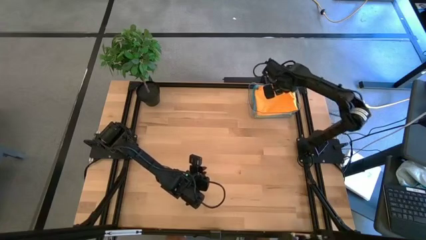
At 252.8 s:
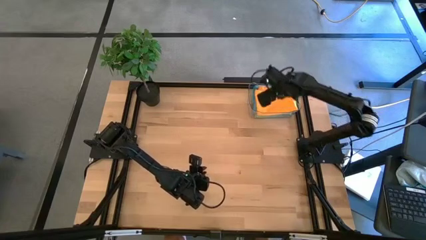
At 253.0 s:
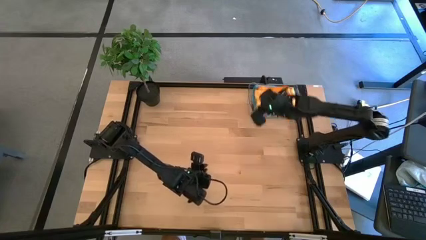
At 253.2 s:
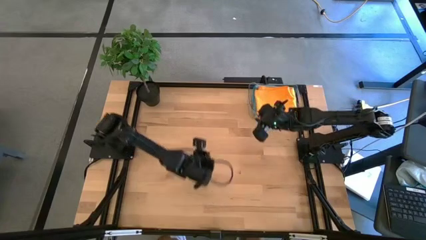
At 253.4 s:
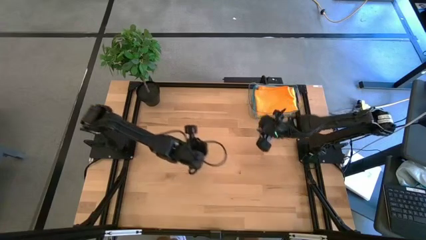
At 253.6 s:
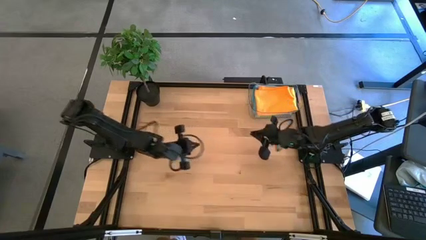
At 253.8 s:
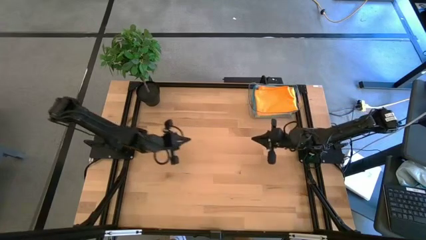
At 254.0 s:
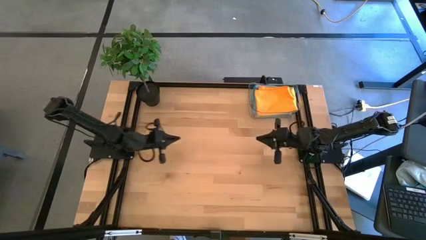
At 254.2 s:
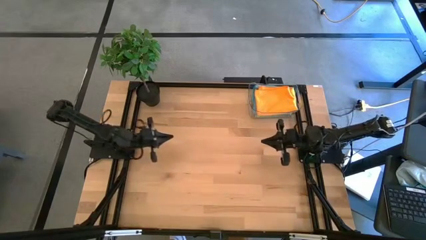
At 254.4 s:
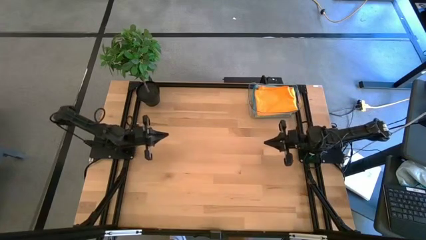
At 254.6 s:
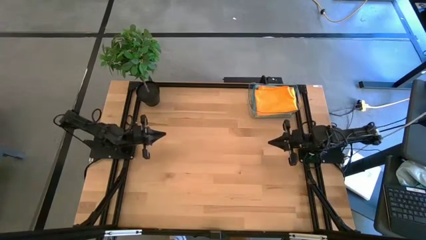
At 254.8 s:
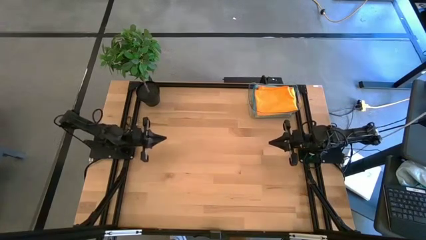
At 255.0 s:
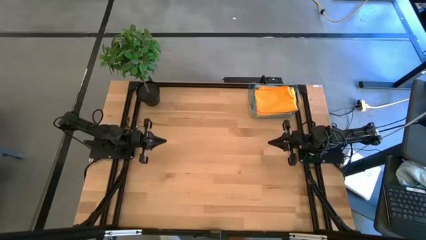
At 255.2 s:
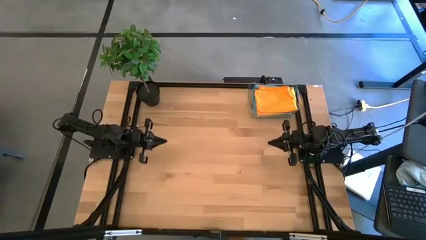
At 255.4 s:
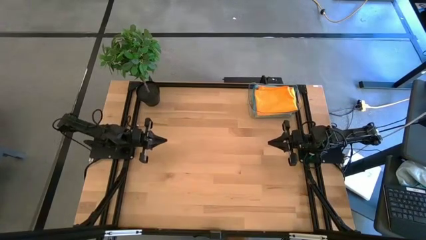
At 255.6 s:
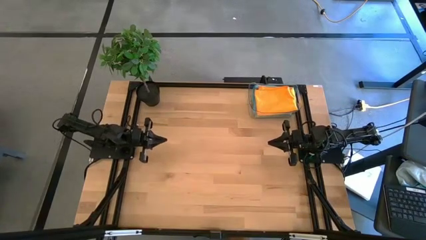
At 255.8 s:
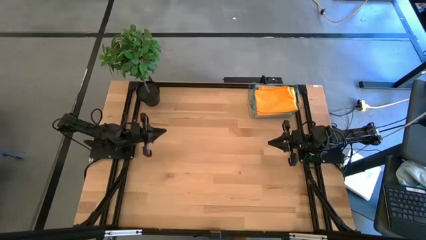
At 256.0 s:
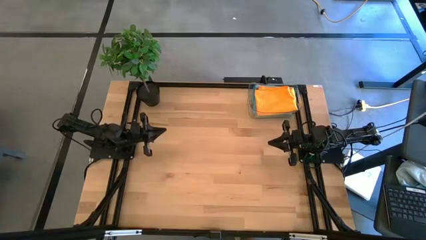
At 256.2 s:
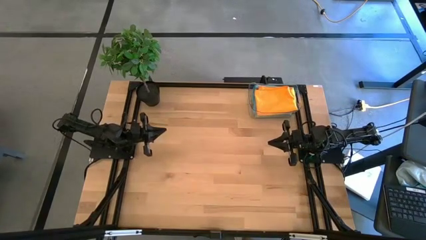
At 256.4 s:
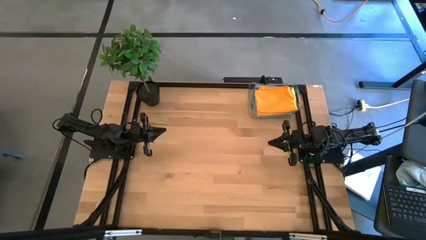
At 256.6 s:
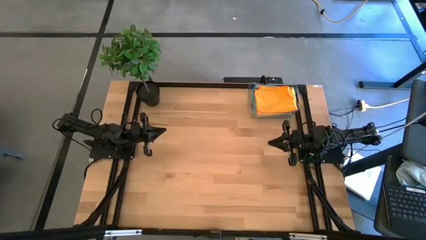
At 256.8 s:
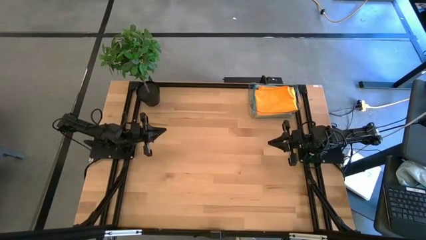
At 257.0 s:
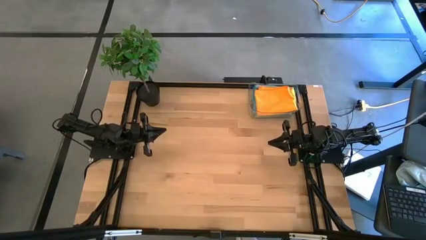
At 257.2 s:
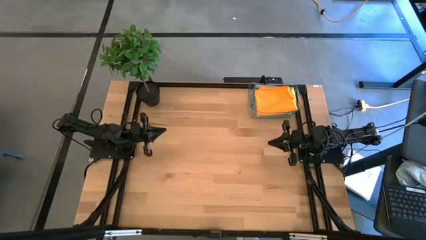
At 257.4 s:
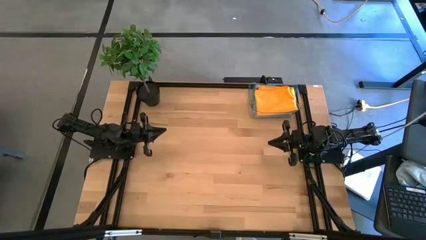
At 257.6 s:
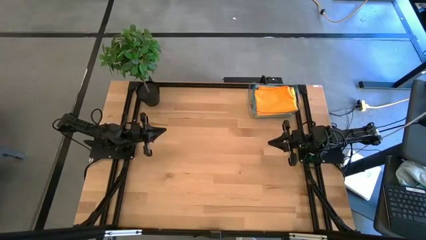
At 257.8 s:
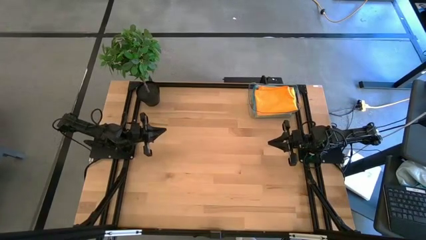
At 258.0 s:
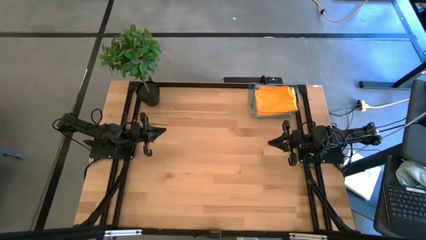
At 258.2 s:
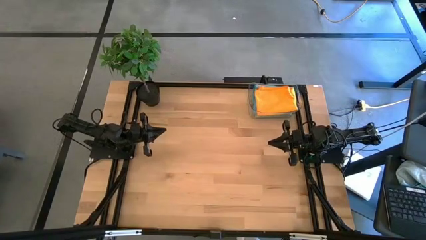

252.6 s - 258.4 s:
Task: Fold microfiber towels
Return to Home Position

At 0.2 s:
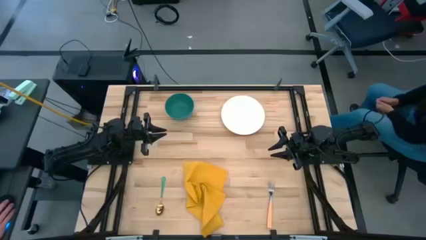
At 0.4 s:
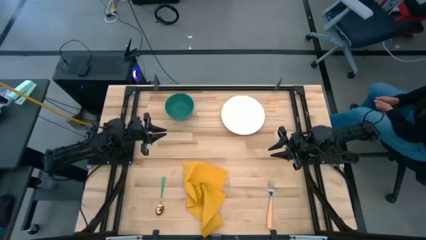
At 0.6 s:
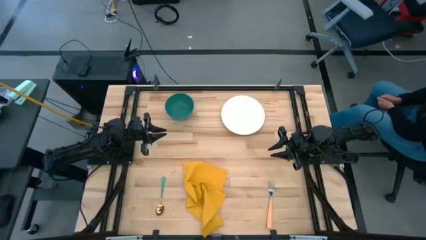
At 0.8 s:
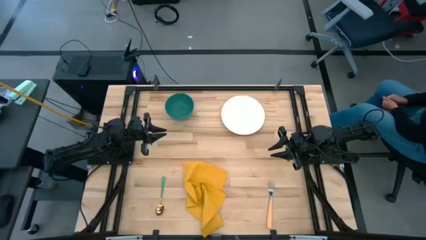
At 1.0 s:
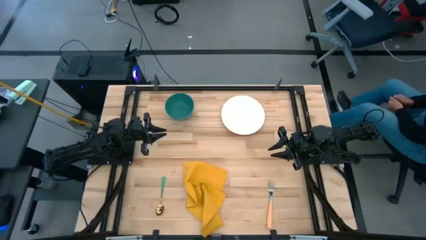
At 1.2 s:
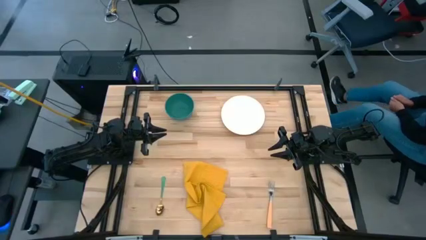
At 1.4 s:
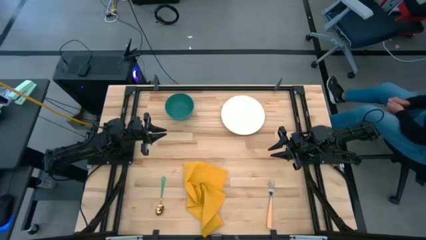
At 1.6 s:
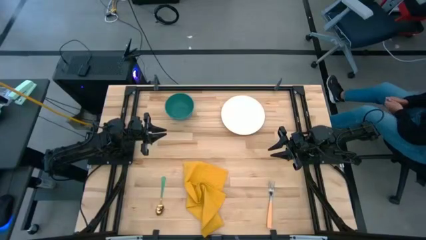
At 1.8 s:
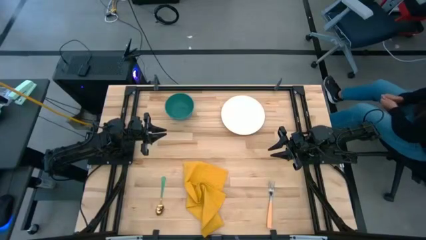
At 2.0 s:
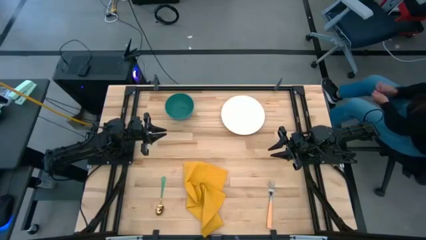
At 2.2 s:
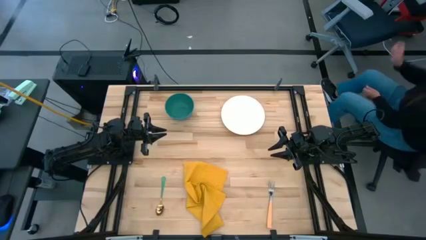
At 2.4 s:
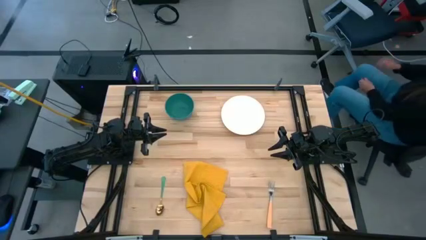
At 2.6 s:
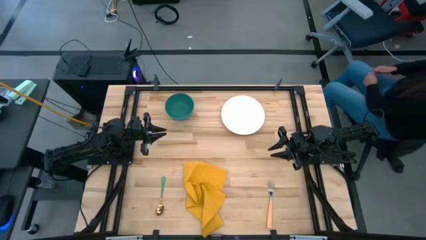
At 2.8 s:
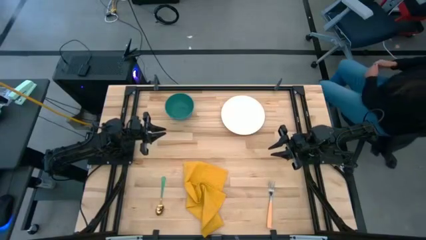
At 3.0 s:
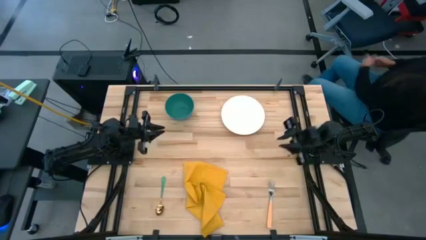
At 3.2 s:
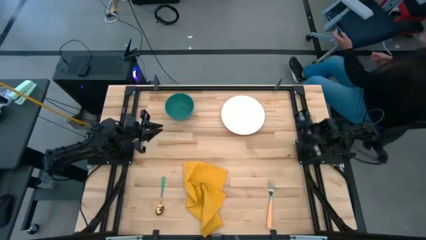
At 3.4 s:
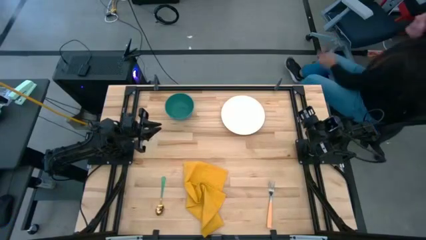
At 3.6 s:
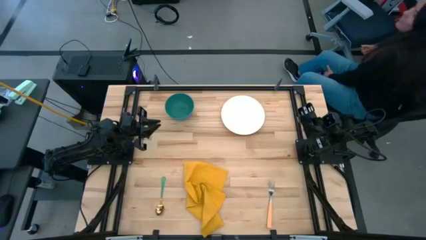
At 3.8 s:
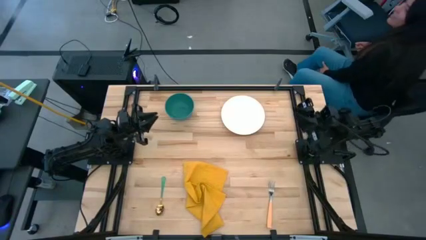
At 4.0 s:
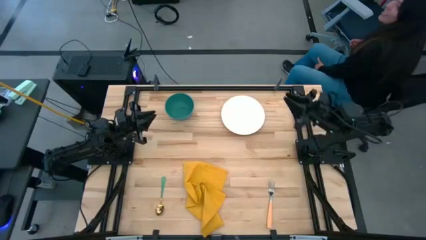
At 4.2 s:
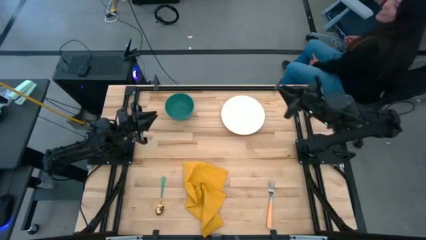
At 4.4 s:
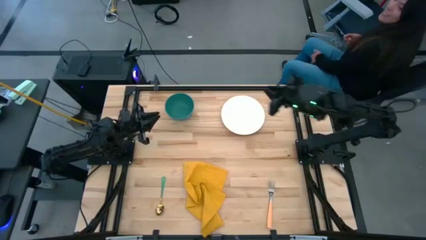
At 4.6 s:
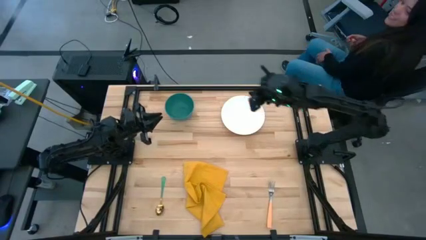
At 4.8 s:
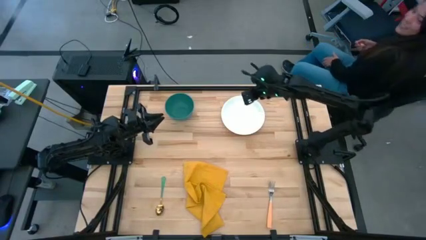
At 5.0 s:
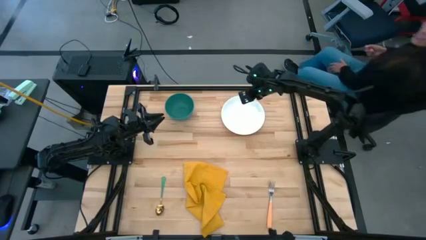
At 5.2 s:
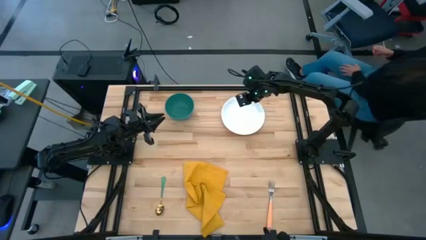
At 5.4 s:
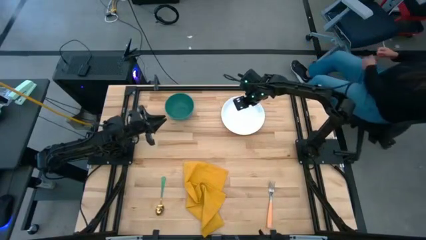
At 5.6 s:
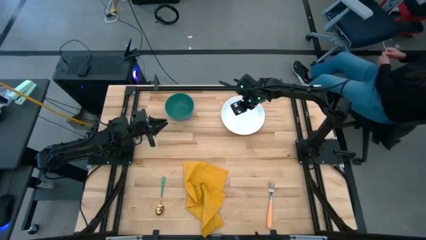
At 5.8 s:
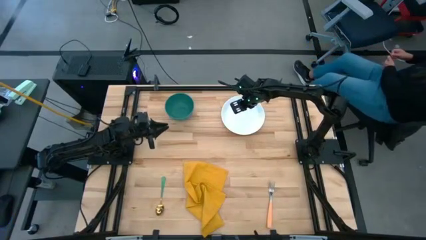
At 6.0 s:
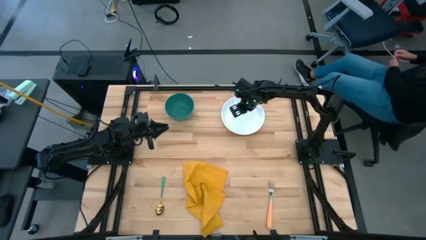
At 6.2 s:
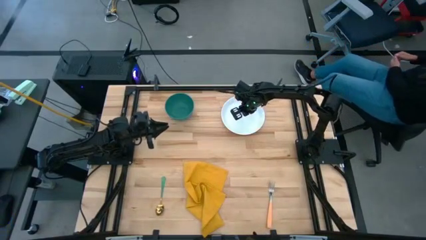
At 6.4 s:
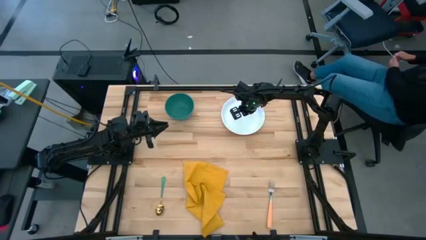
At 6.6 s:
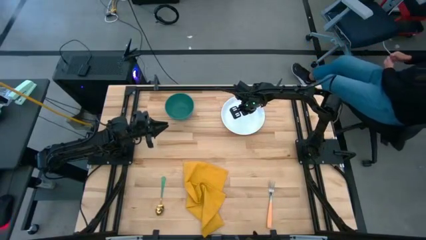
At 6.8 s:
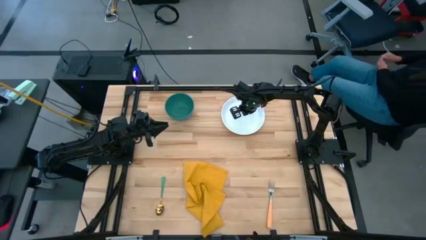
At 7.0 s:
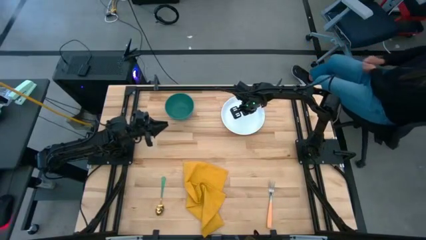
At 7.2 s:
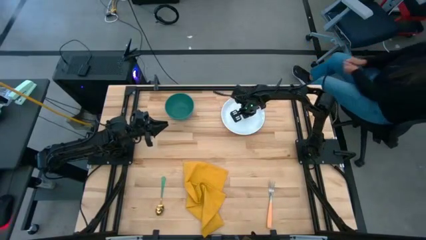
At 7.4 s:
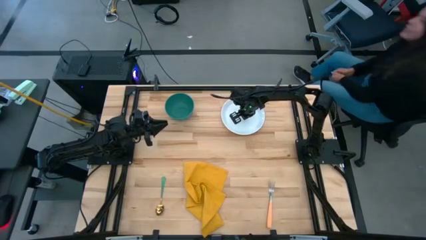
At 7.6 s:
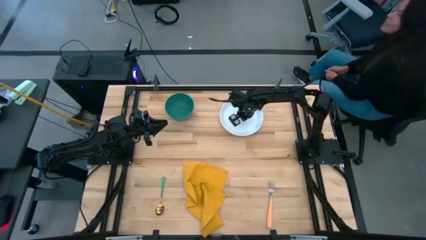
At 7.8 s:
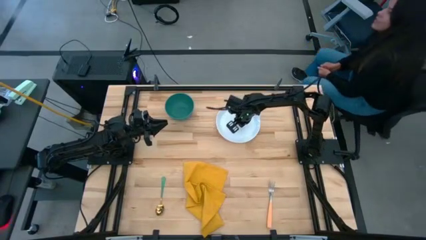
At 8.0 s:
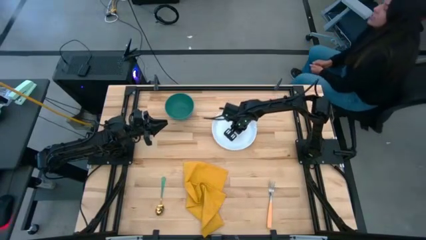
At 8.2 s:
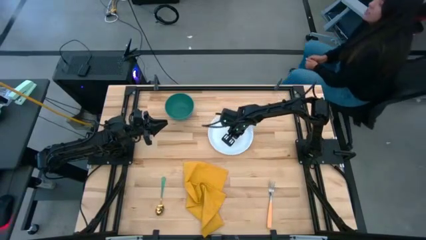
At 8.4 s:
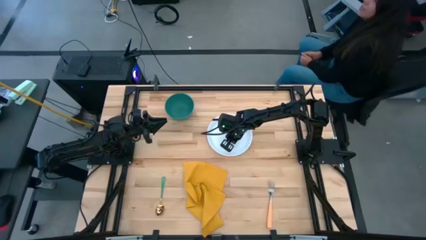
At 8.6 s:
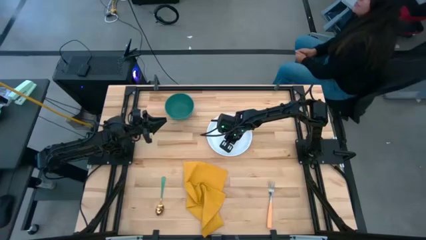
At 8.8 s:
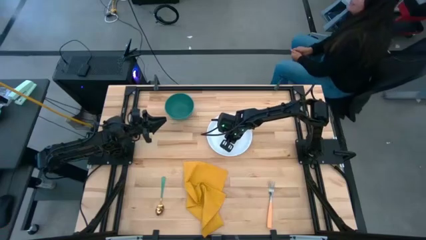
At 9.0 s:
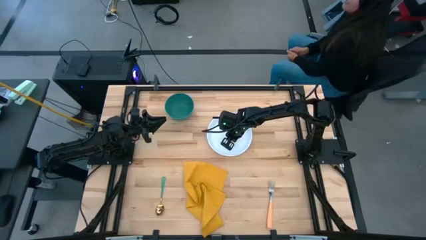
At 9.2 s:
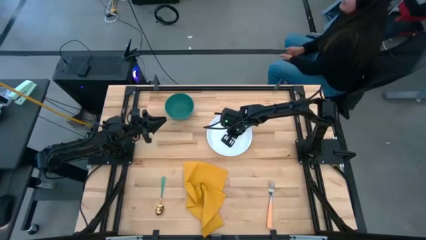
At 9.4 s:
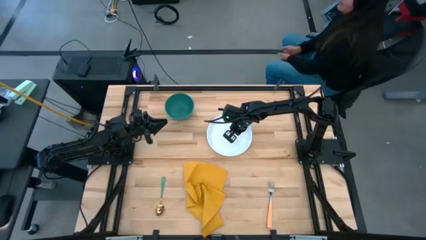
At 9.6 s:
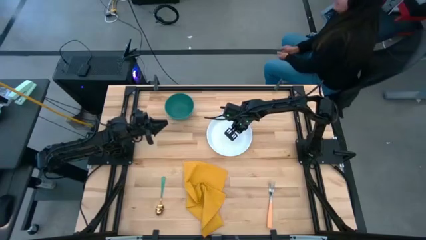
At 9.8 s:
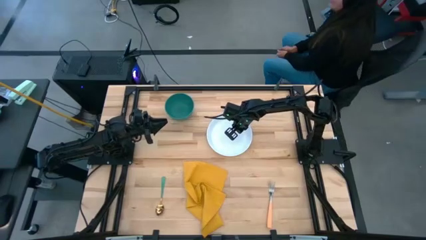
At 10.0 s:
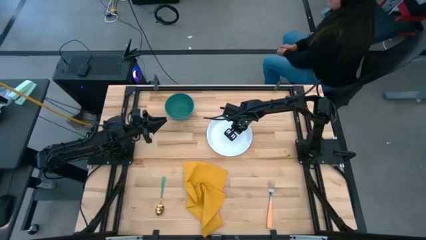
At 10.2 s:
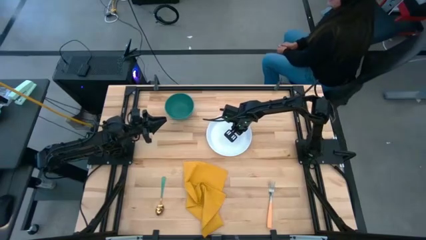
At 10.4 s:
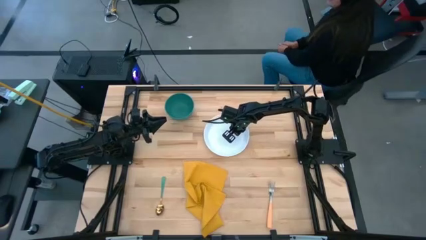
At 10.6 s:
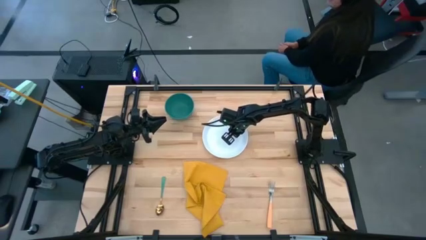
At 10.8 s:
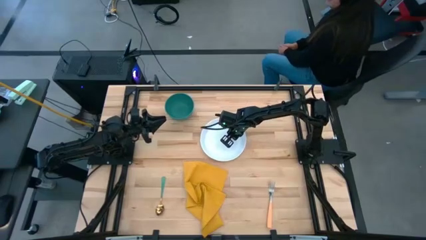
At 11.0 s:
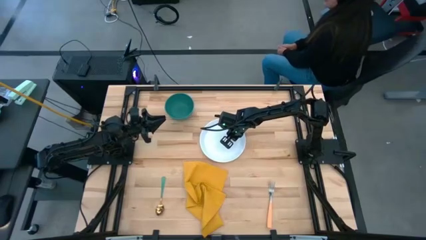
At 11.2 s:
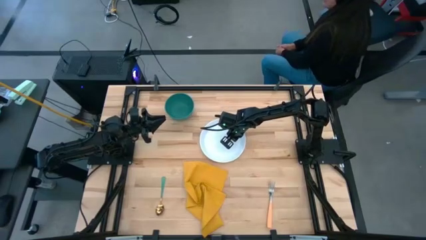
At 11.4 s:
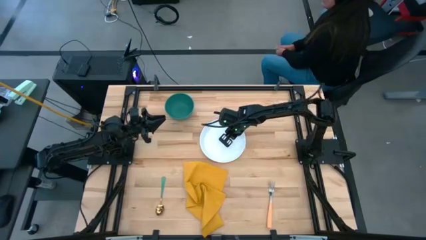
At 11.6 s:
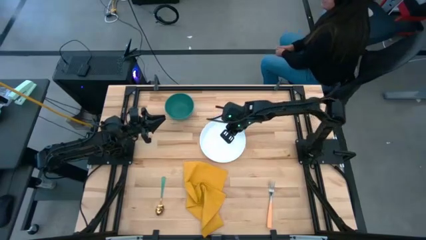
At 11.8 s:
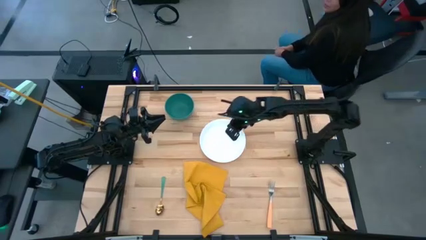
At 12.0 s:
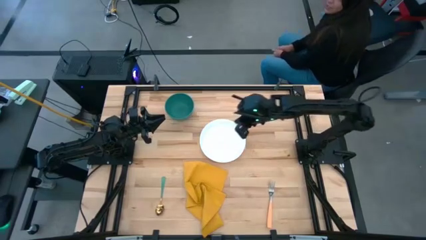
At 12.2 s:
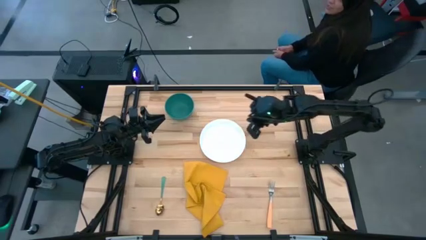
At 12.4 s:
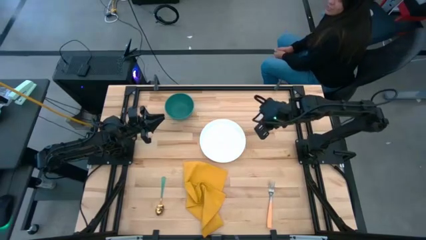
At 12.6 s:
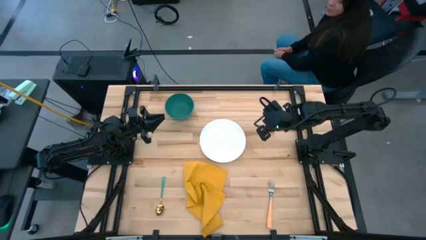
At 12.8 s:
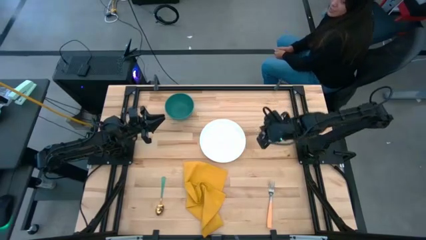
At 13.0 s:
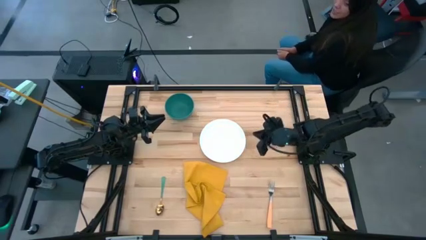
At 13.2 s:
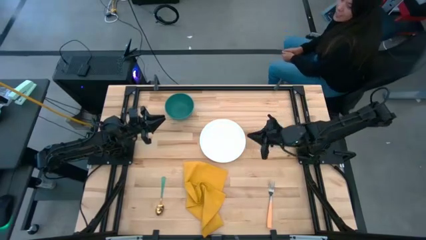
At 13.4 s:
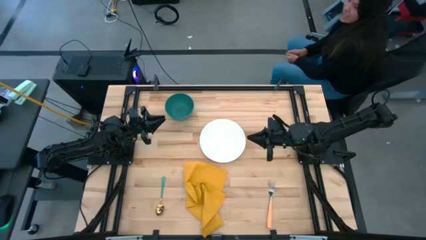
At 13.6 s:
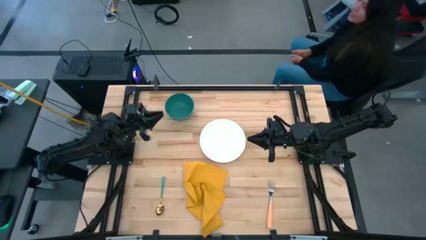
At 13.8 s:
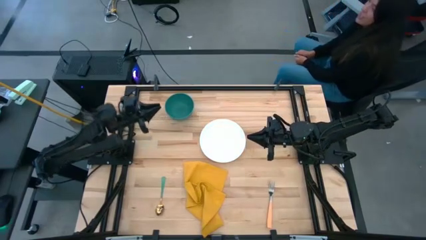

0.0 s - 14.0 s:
Task: Set table place
Place the white plate in the center of the table
